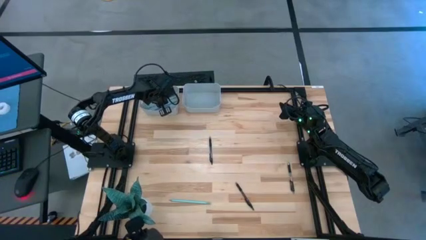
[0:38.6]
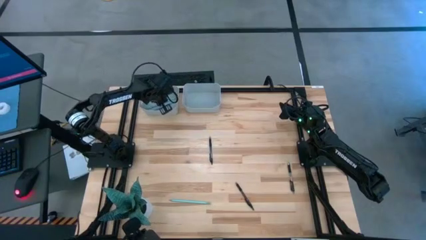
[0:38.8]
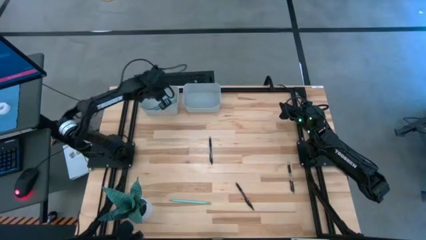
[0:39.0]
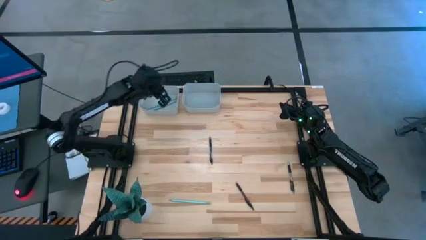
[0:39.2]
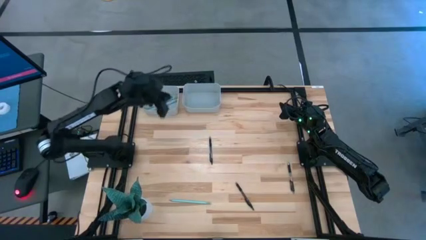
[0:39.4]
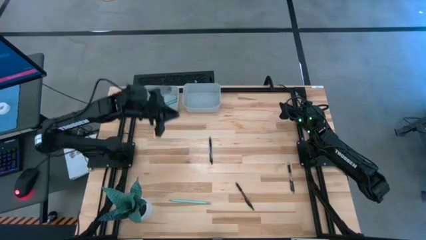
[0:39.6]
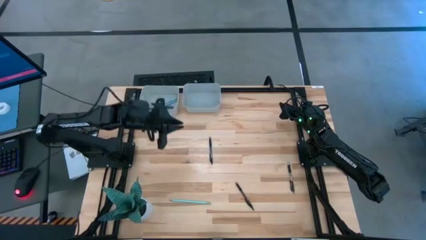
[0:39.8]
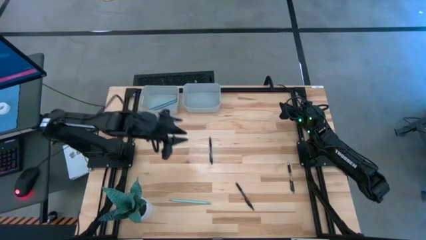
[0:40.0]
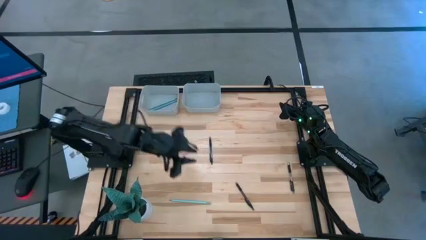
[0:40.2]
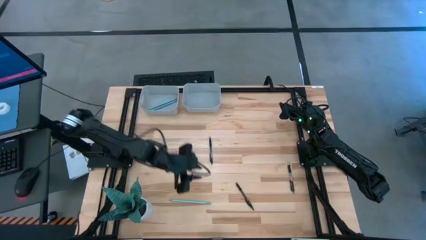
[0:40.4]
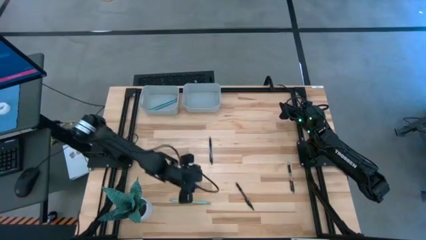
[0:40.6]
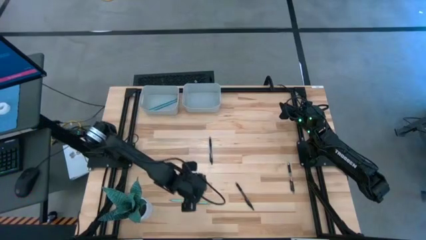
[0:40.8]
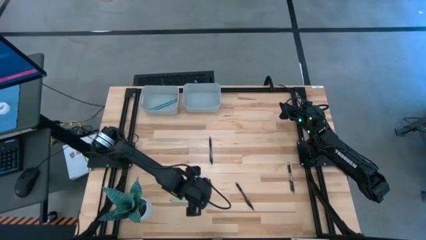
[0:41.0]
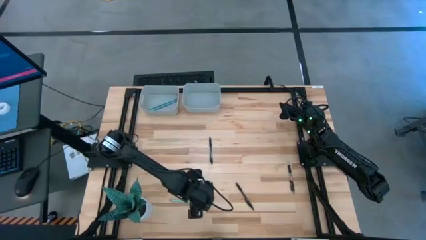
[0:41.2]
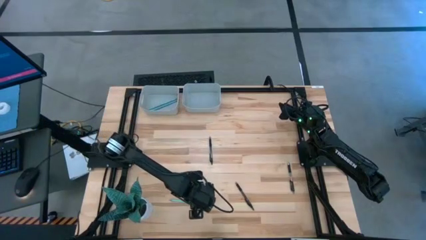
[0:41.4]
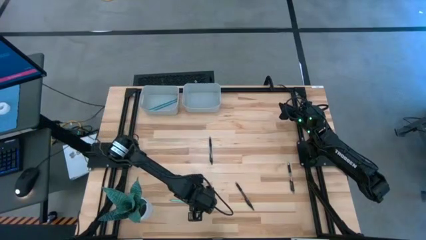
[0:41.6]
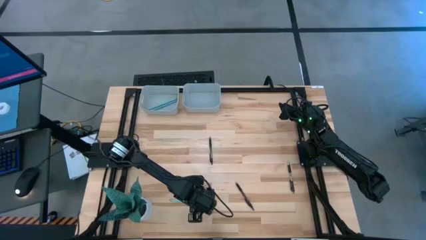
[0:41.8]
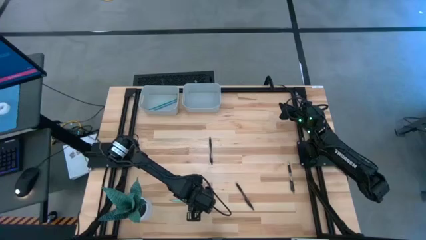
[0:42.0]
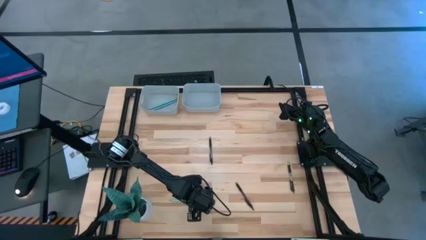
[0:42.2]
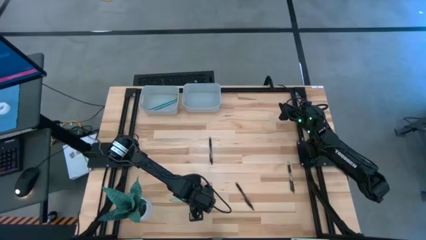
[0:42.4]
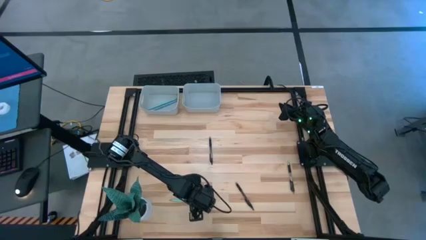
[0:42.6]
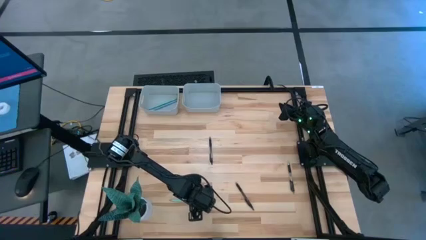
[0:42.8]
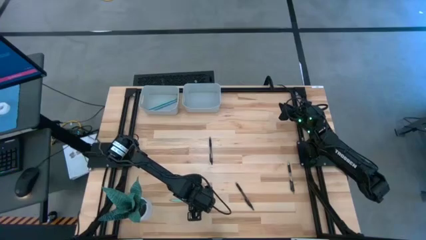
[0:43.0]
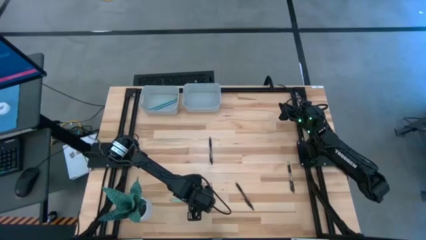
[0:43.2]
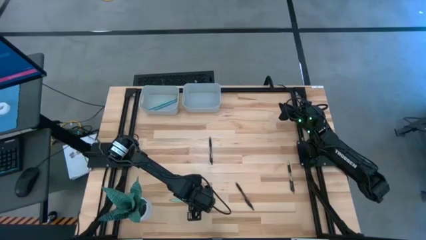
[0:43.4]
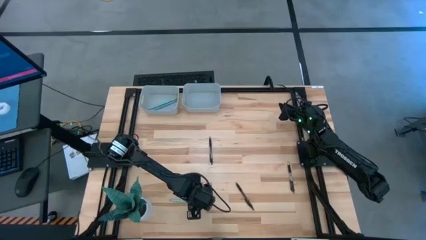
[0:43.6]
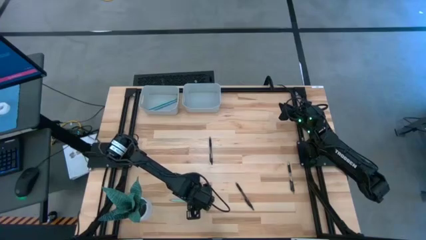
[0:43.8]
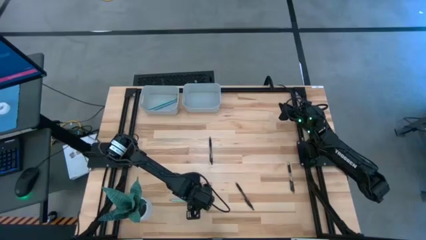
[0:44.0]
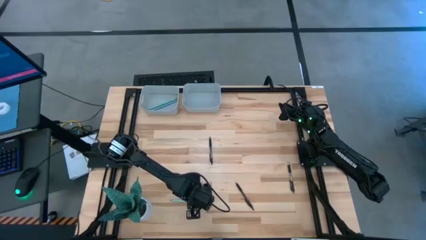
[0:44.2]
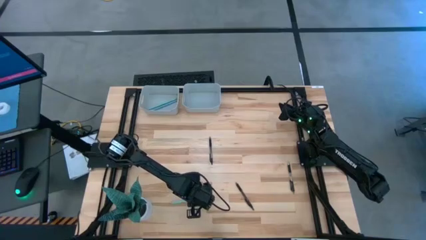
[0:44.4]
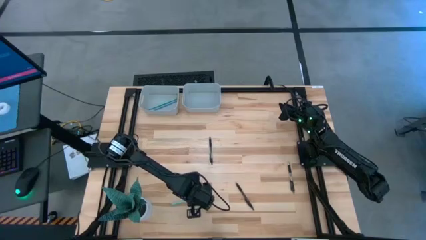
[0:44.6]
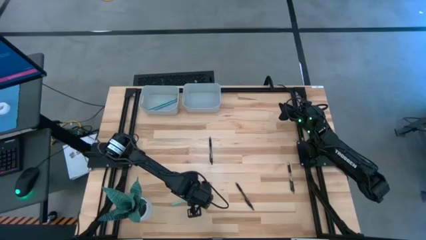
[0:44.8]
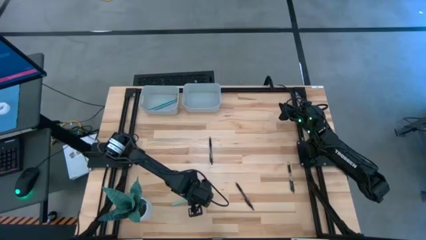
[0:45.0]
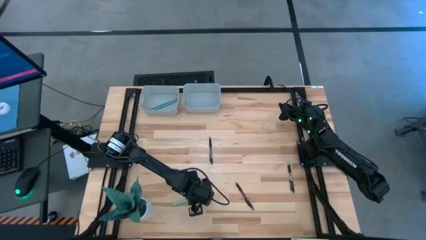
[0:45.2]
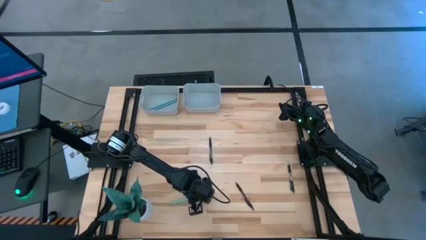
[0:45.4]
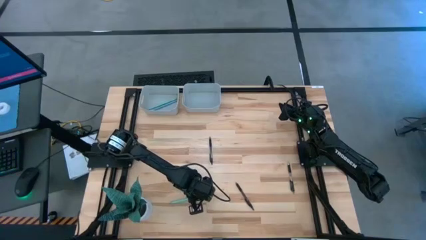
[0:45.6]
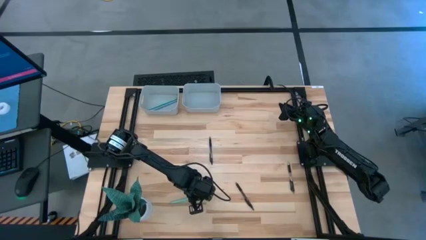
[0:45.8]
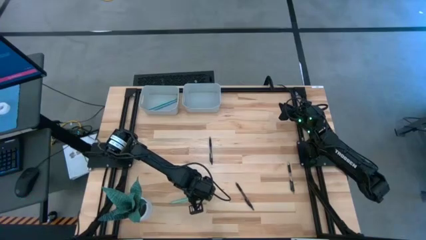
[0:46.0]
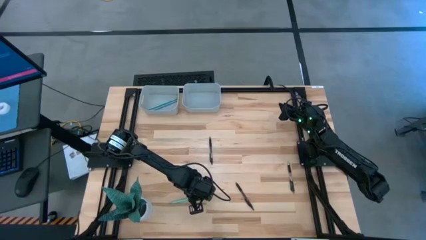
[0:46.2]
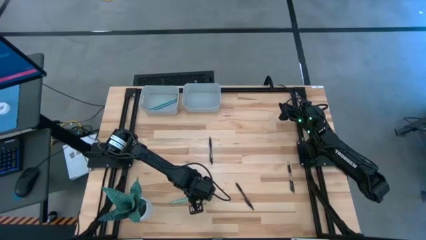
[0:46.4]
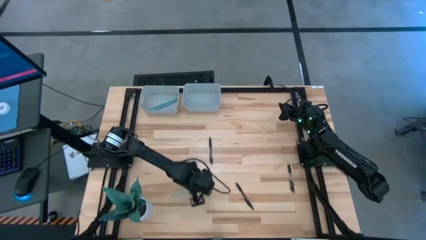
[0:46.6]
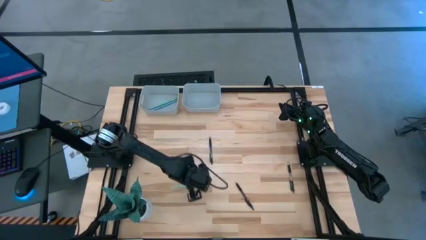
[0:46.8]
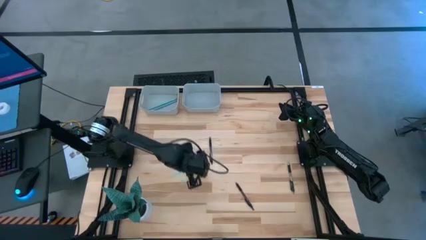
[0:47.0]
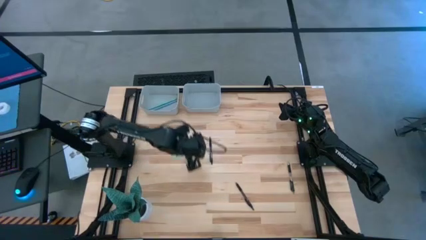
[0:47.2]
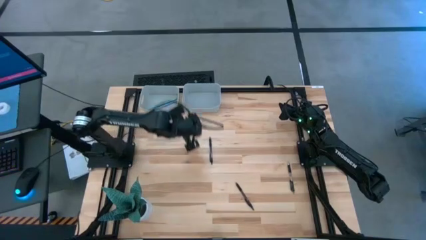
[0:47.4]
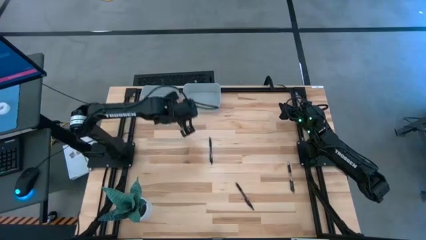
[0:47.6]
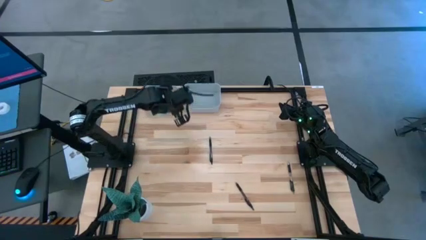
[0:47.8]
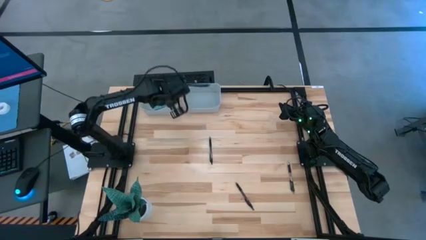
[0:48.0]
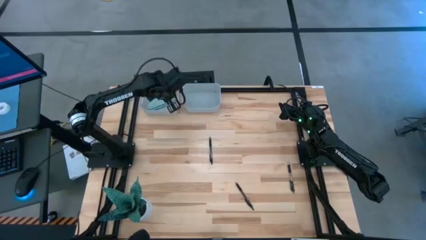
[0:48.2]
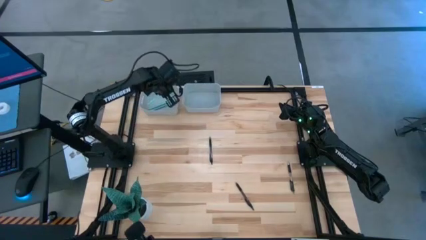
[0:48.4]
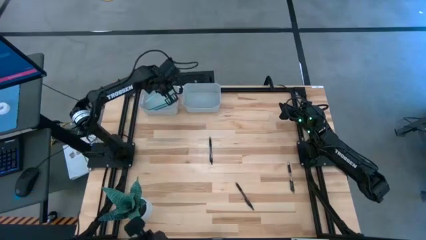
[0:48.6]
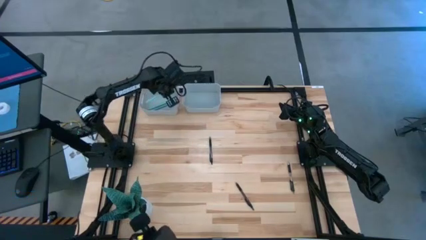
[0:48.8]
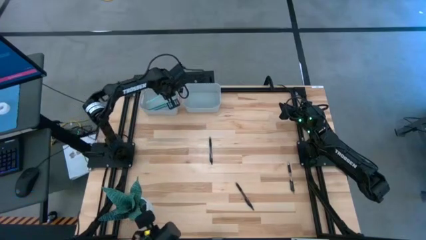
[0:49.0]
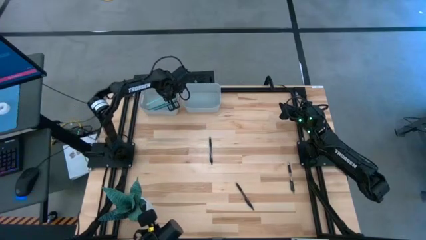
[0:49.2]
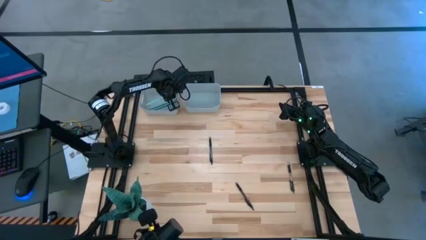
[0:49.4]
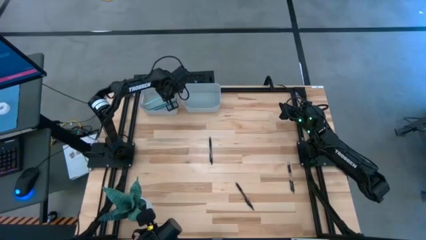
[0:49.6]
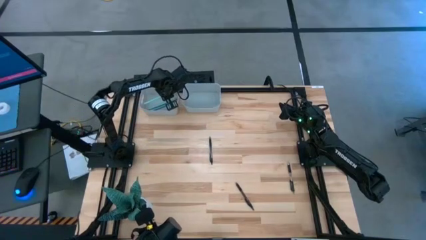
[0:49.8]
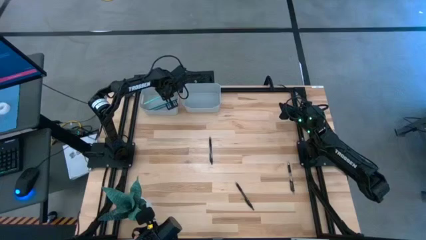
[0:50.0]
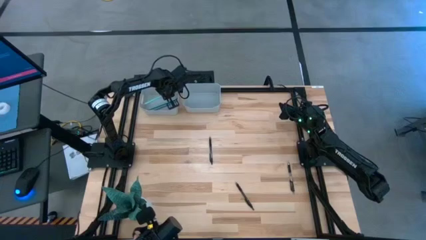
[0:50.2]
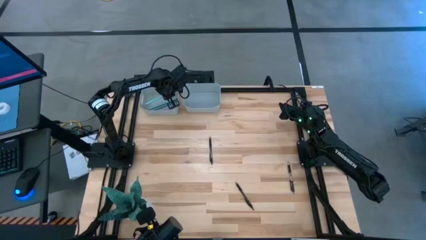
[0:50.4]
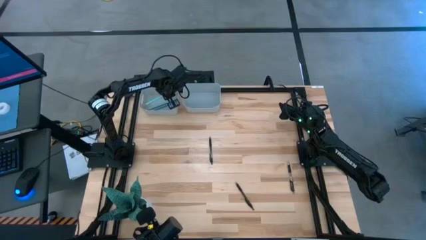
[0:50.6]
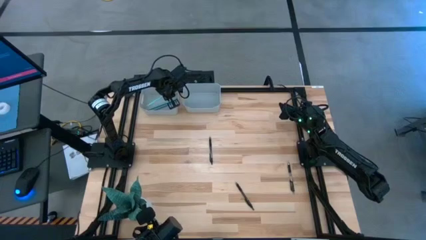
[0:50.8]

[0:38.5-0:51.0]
Task: Sort pens & pencils
Put the green pencil into the left gray bin

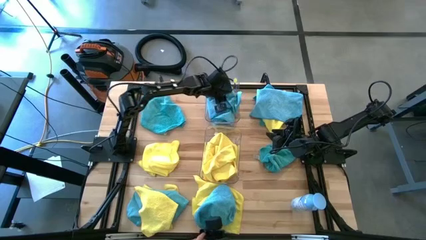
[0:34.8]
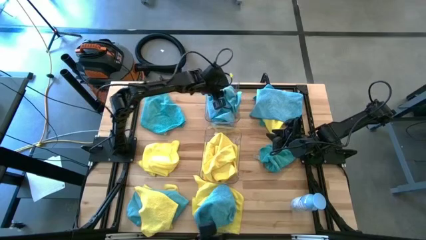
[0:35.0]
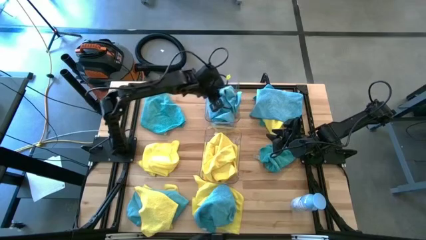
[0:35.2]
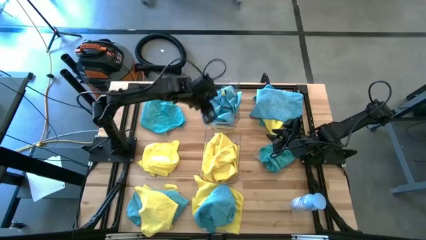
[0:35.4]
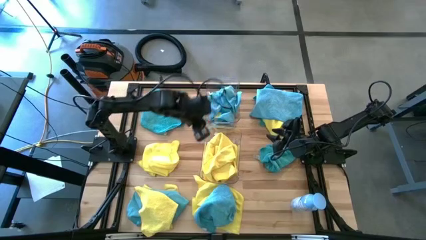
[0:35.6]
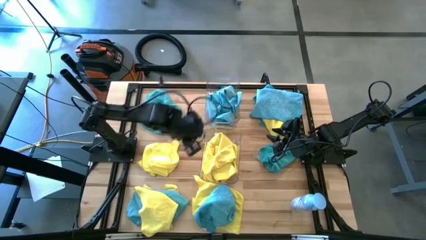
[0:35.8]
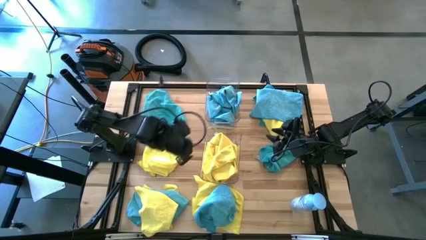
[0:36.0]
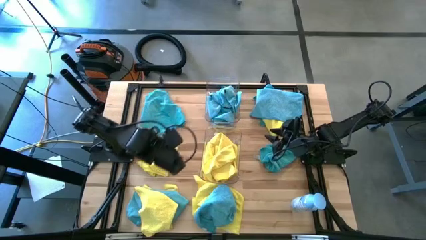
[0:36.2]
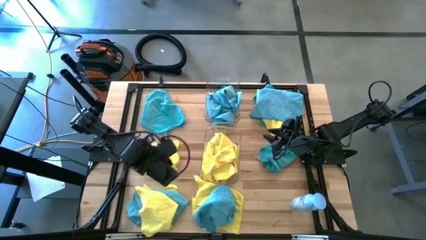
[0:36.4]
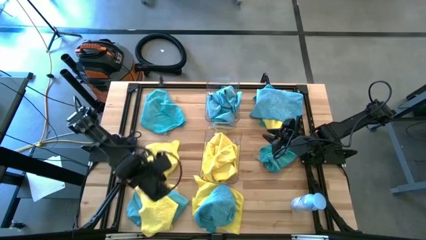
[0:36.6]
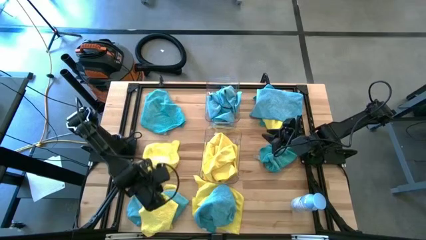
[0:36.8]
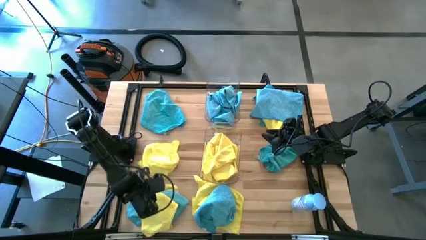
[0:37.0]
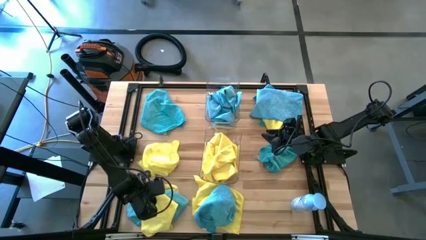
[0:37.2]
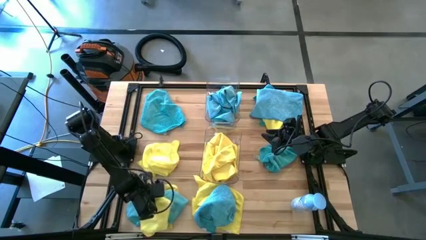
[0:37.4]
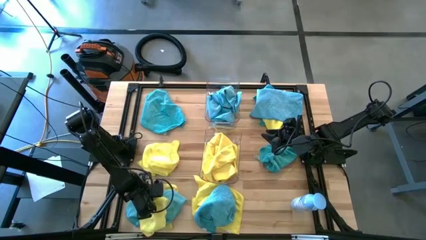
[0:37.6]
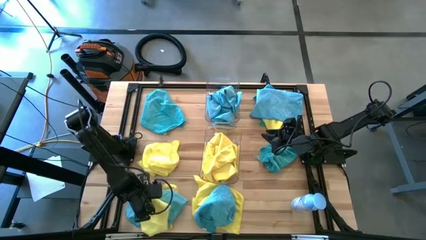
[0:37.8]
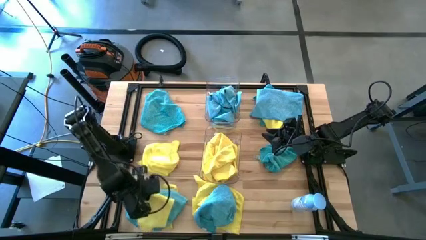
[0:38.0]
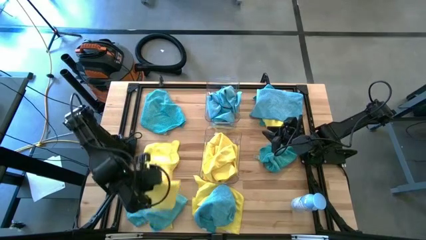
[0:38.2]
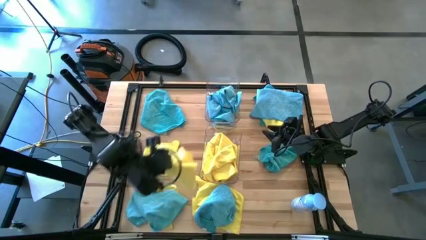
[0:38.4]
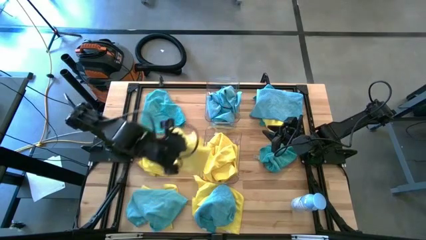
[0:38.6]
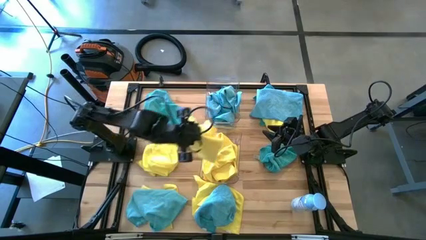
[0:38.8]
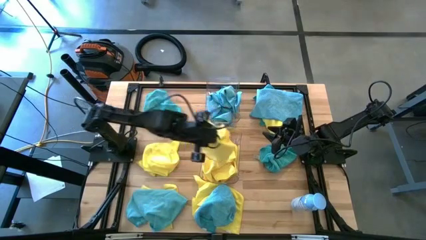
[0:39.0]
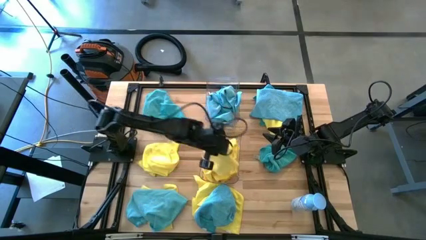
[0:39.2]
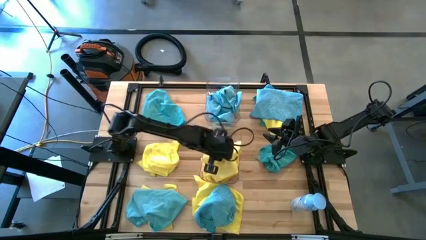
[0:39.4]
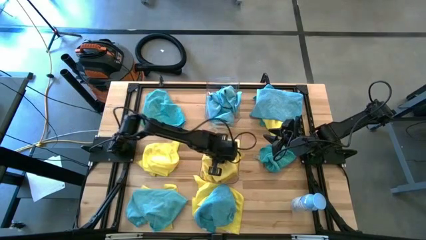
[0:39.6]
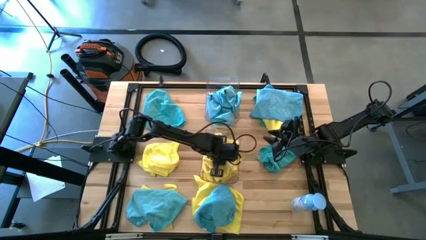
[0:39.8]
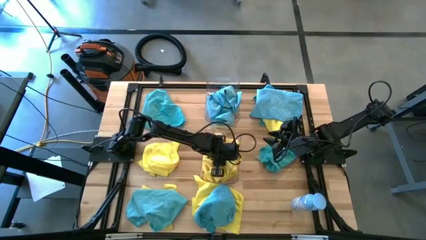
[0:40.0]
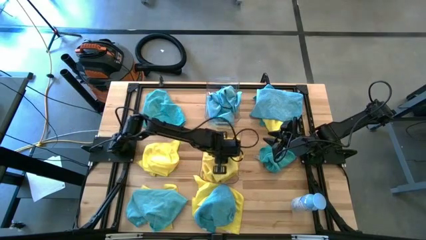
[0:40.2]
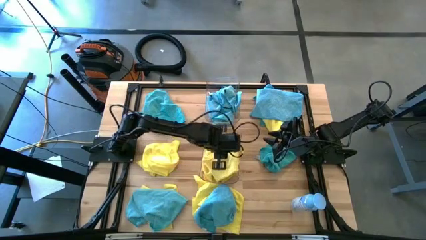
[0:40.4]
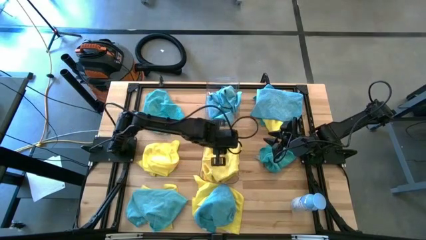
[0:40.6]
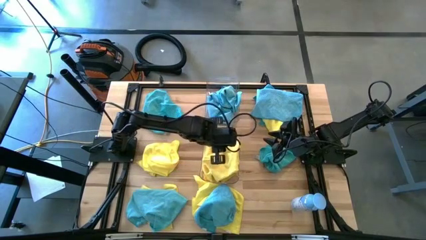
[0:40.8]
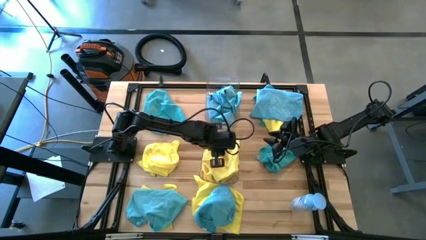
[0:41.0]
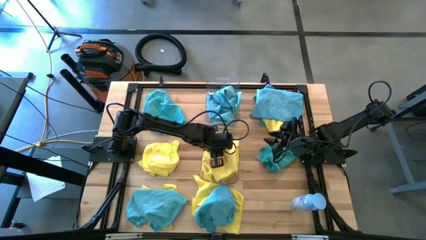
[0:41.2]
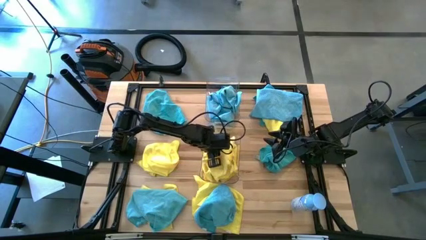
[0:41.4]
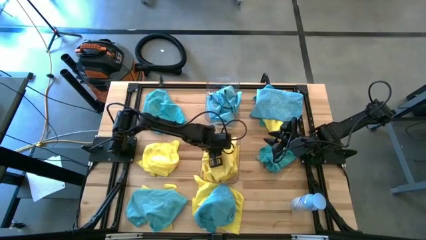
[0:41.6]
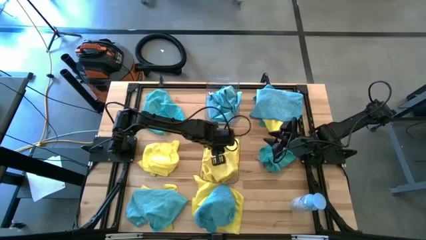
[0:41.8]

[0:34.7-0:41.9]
Task: Sort microfiber towel by color & place in baskets
Put the yellow towel into the bottom transparent bin
